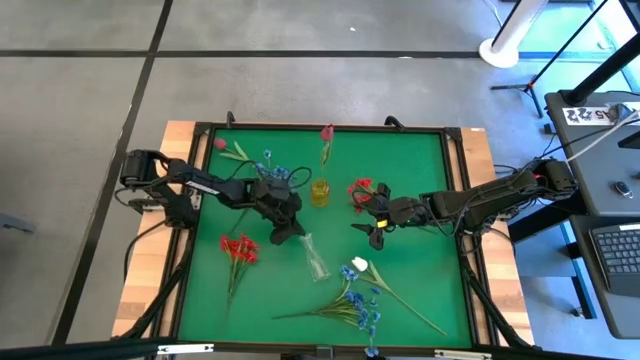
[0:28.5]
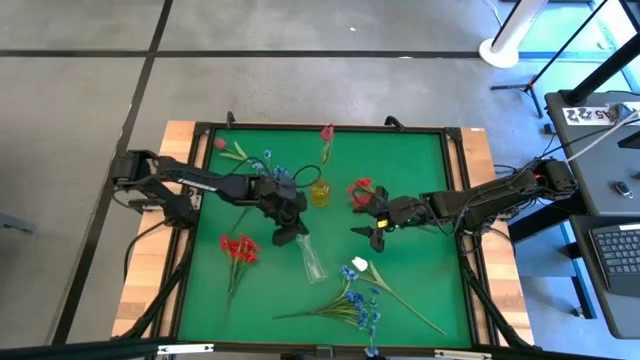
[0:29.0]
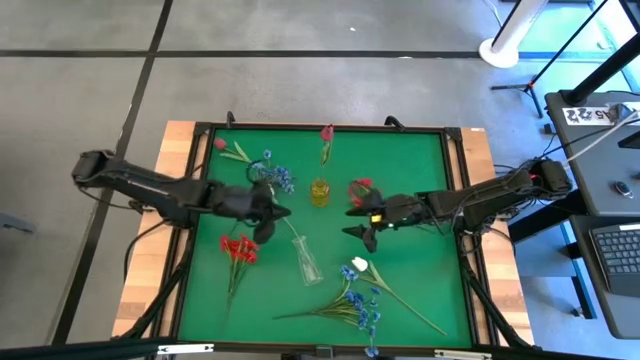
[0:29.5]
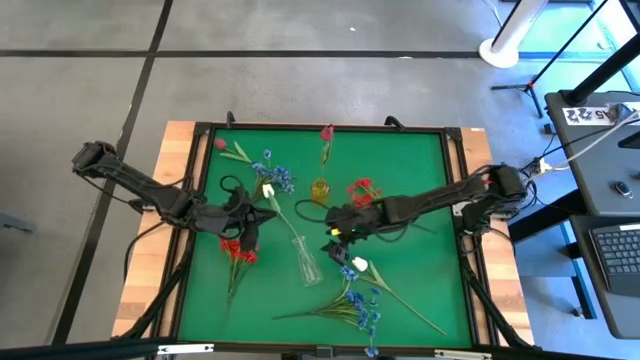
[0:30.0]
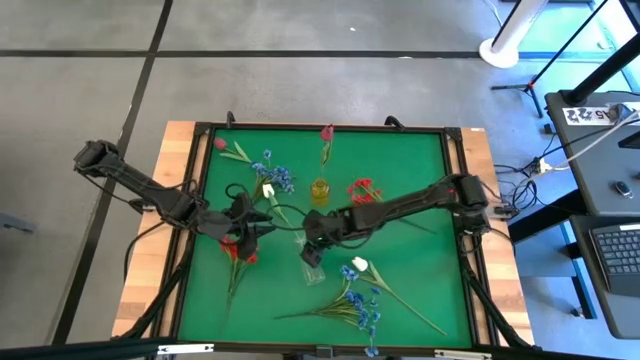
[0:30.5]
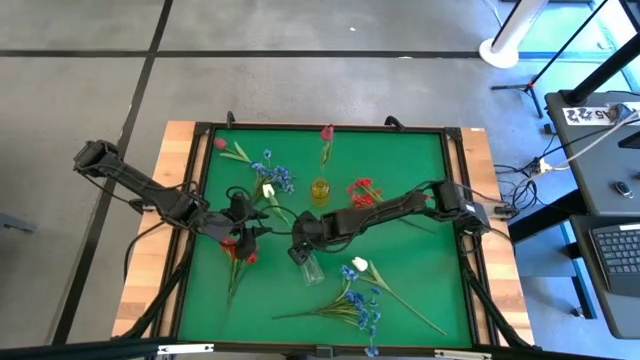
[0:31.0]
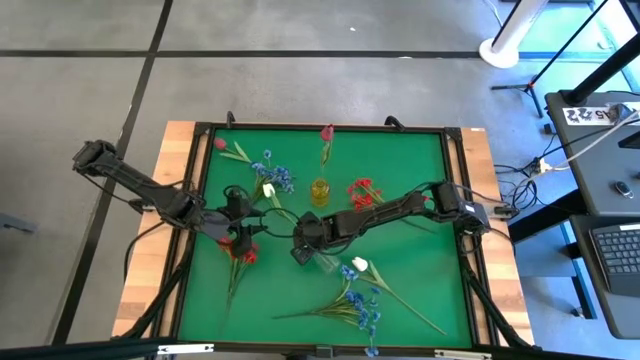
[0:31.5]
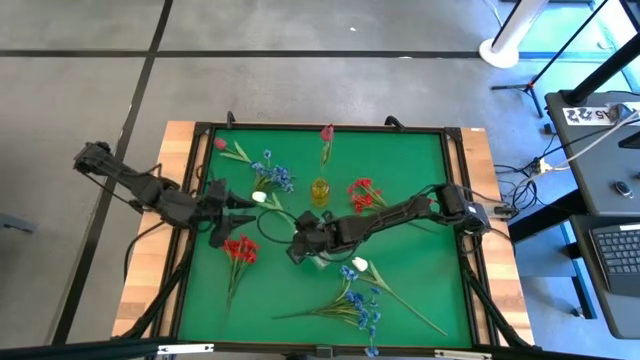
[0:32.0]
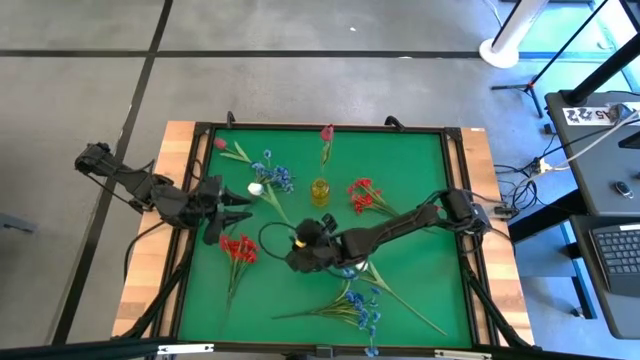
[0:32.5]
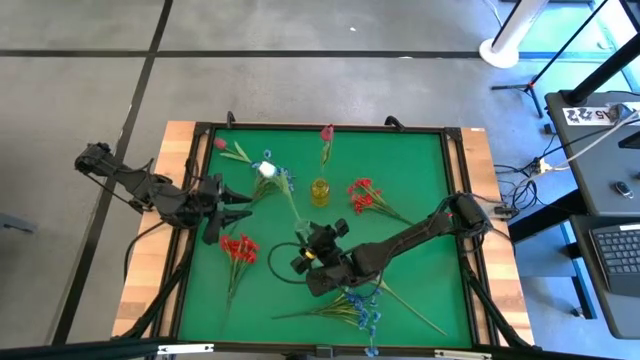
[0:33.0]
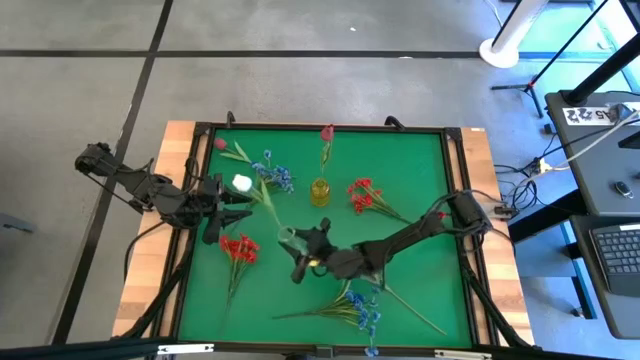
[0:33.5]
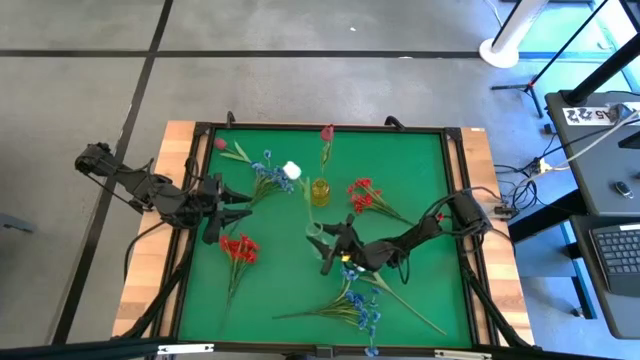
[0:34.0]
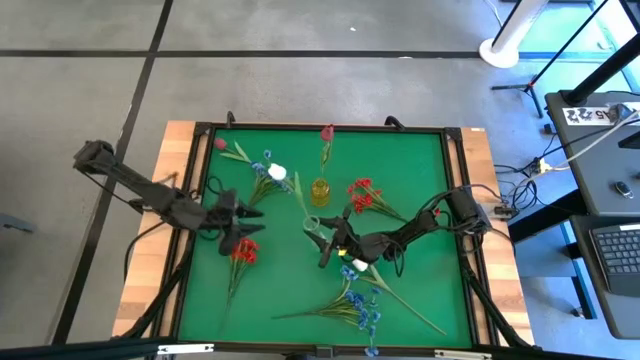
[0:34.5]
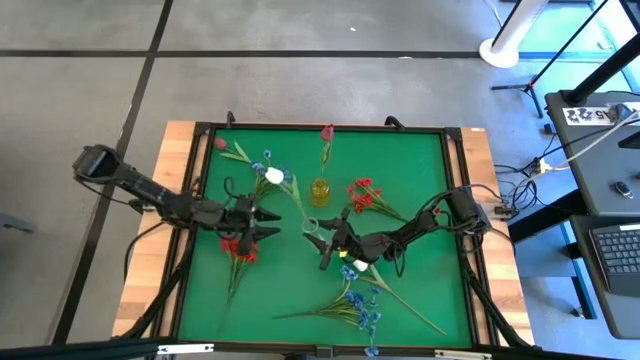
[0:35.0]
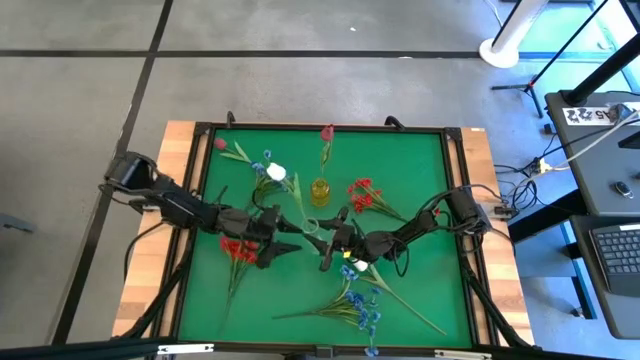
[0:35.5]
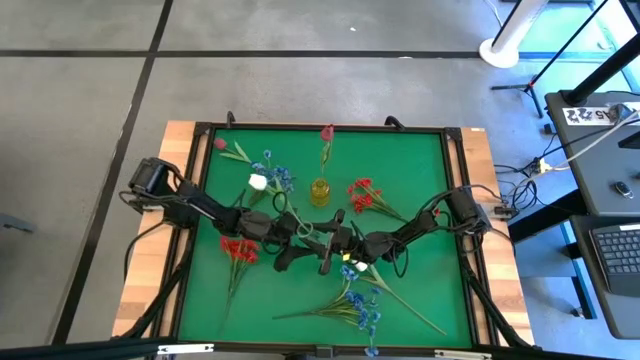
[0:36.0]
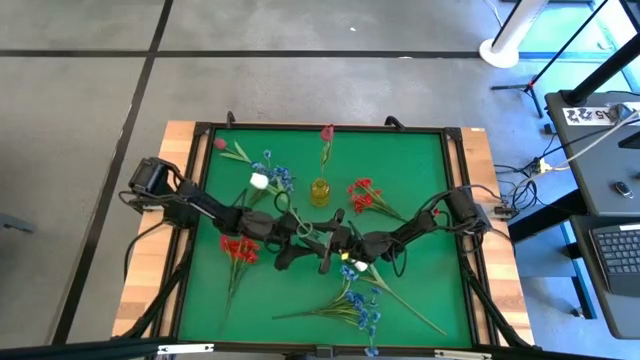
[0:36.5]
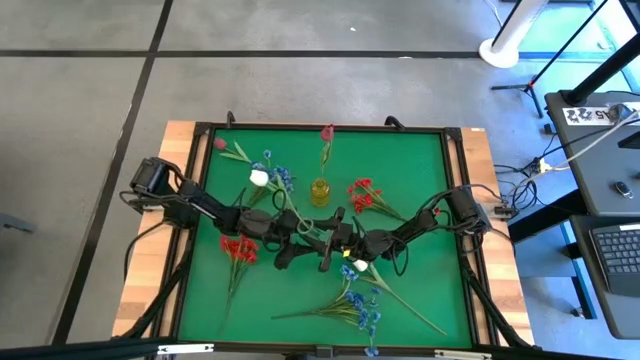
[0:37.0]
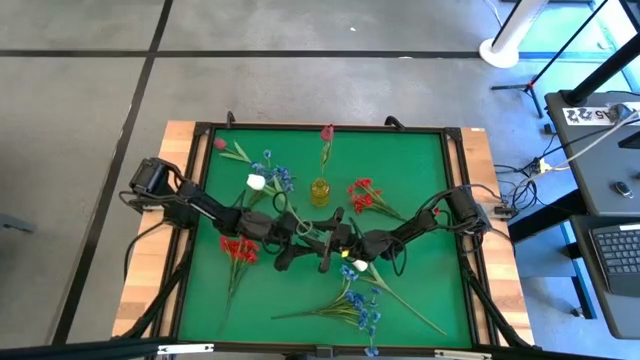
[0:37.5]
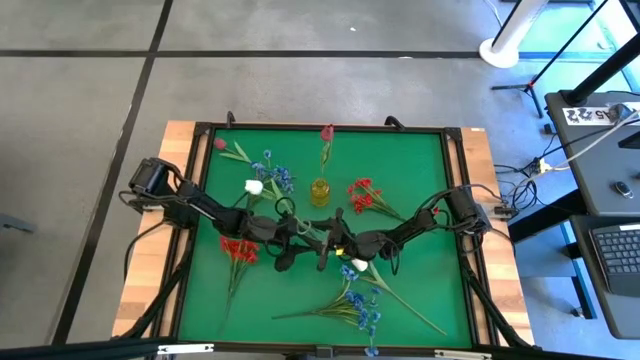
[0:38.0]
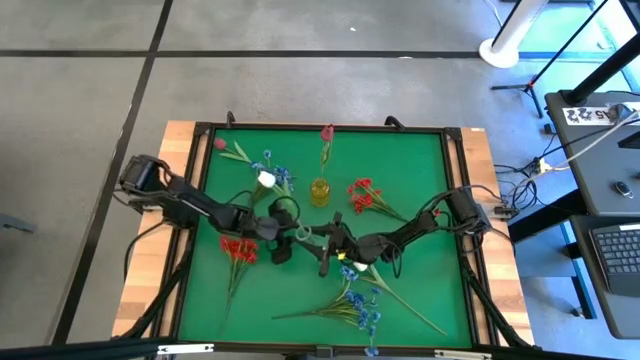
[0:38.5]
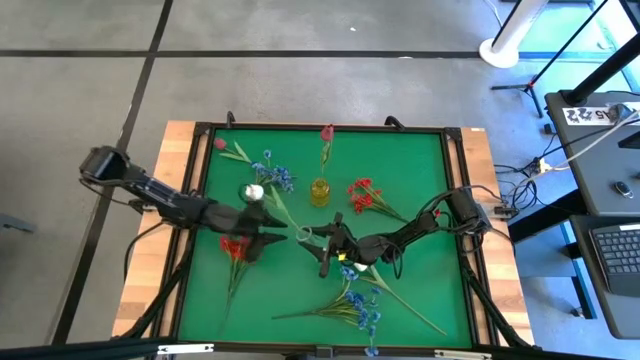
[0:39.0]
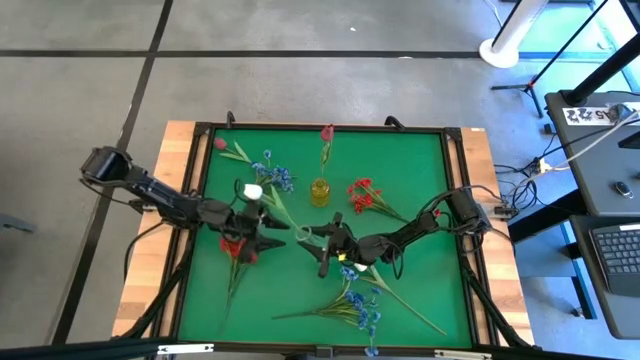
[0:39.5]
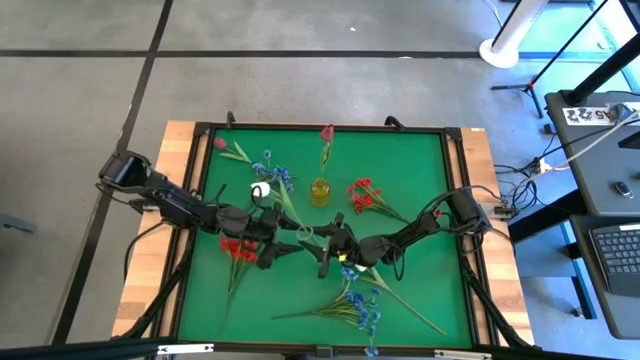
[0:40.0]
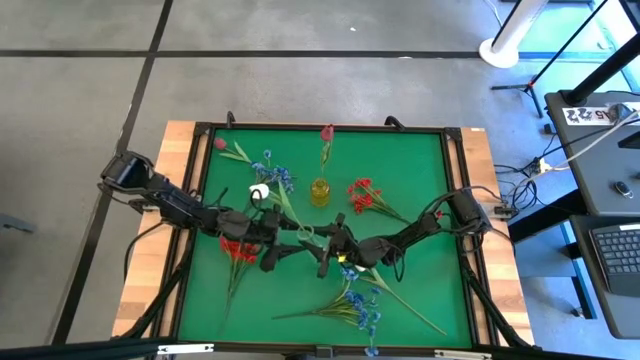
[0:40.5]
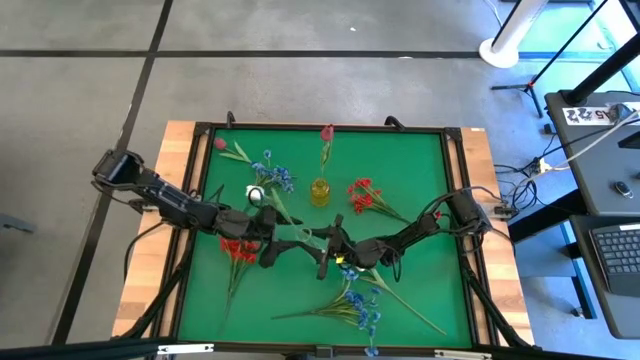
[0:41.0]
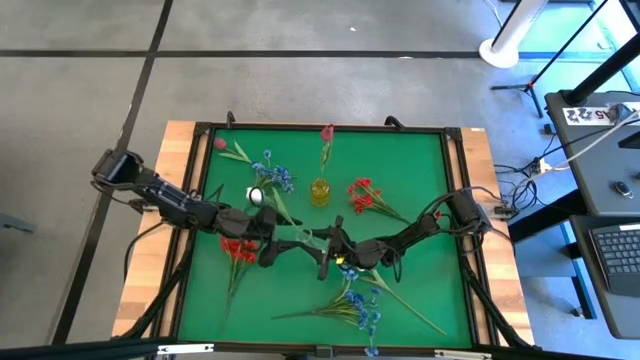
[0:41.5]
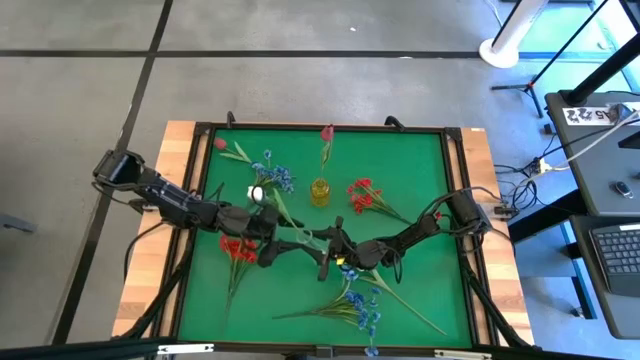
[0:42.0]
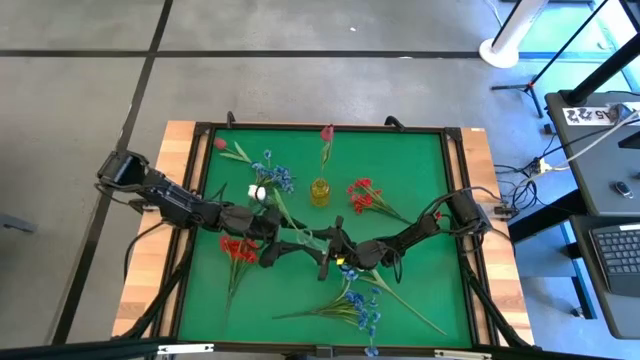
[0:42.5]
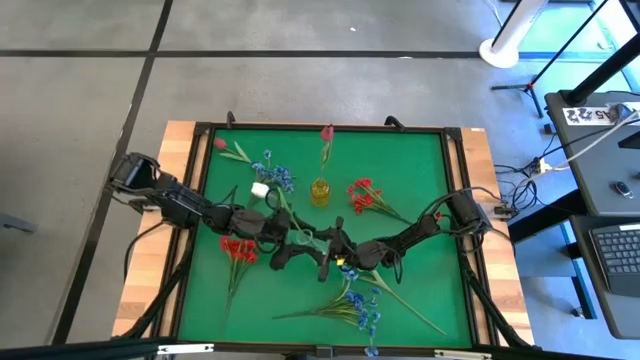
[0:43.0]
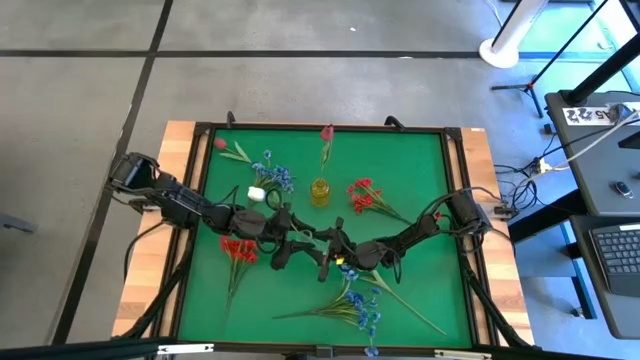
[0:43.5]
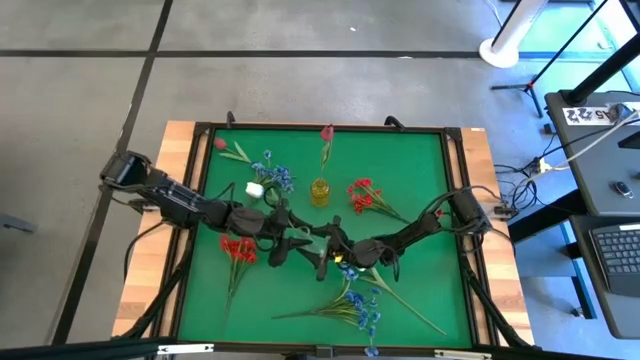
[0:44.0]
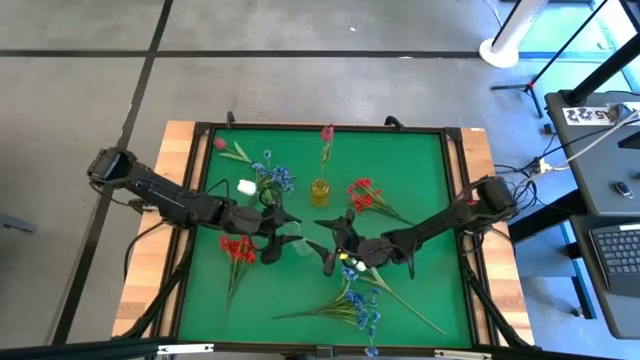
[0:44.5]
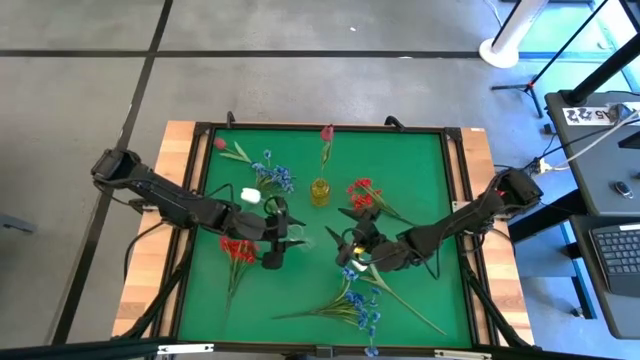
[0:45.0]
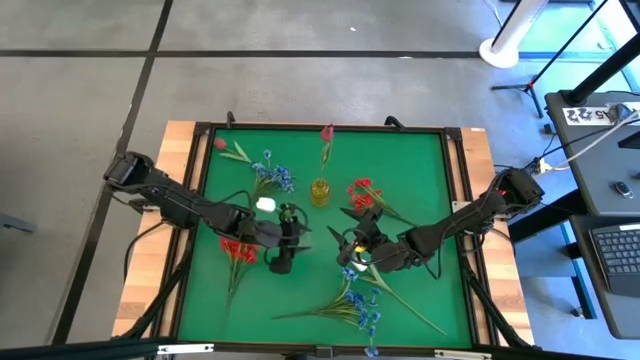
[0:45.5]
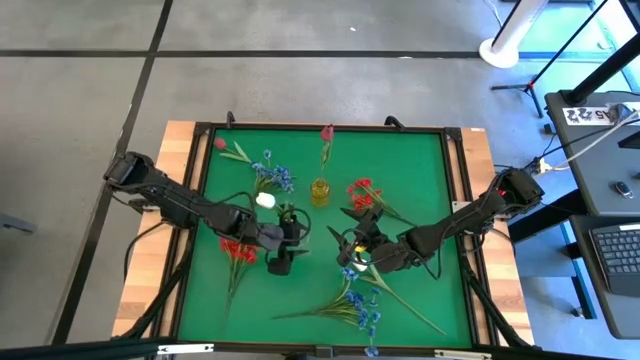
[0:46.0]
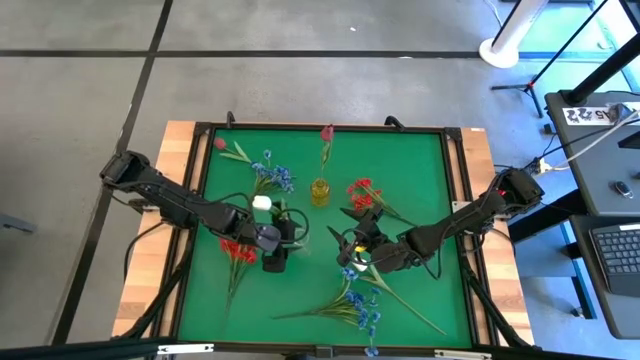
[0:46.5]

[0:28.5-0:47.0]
Task: Sort flowers into vase by color
Adjust the transparent flower vase
